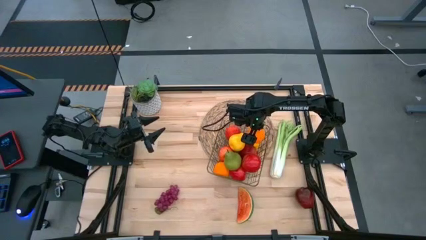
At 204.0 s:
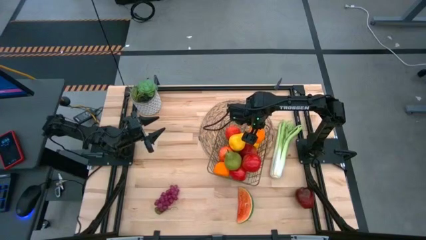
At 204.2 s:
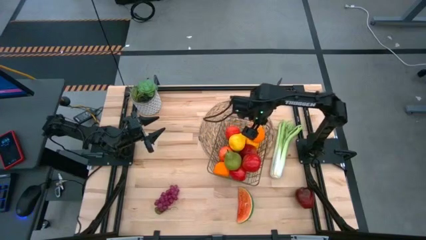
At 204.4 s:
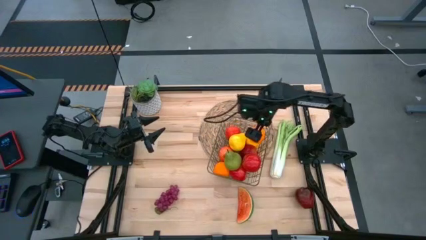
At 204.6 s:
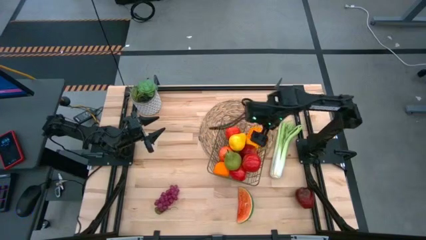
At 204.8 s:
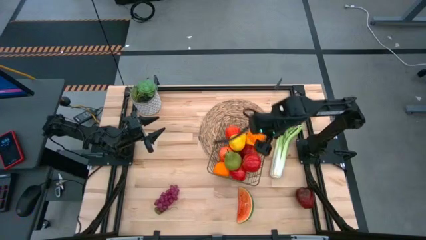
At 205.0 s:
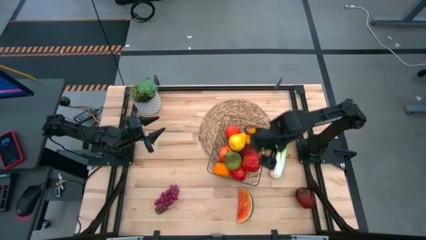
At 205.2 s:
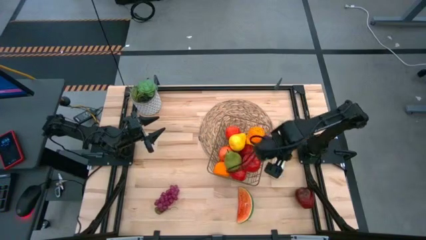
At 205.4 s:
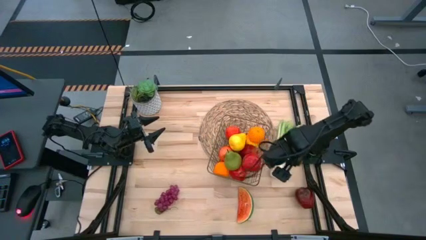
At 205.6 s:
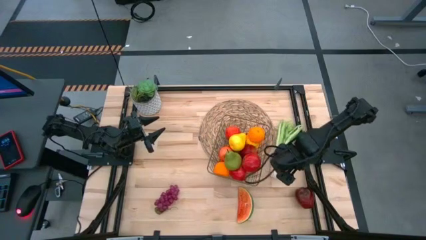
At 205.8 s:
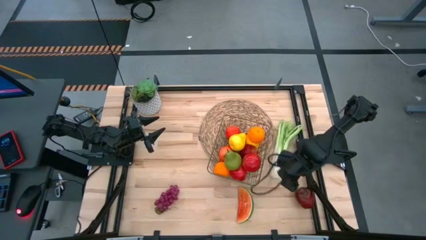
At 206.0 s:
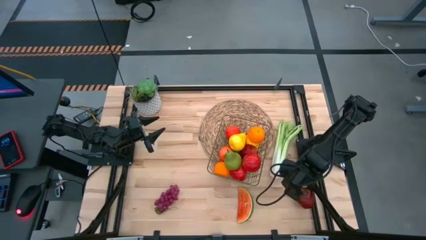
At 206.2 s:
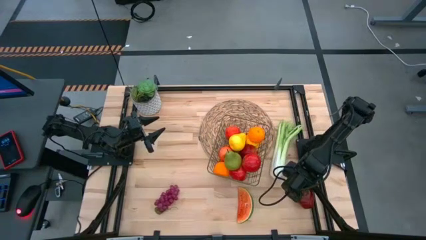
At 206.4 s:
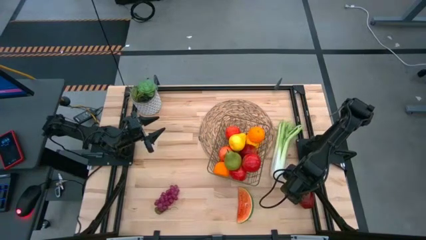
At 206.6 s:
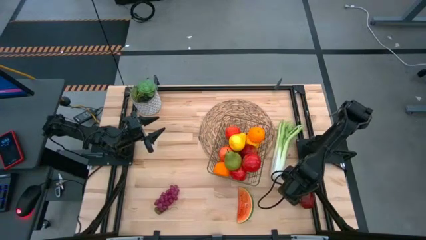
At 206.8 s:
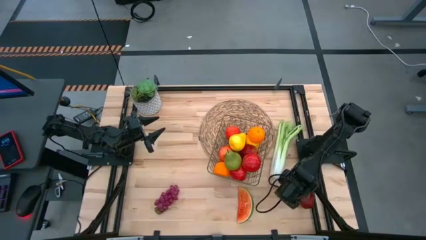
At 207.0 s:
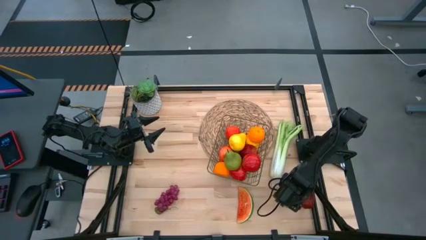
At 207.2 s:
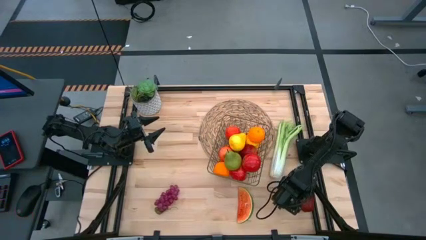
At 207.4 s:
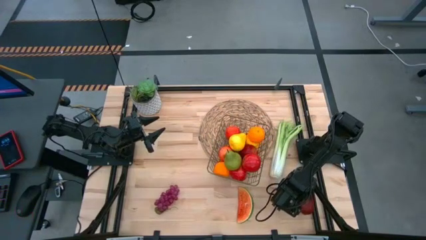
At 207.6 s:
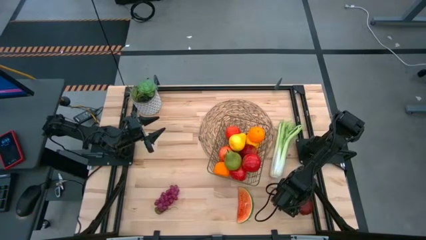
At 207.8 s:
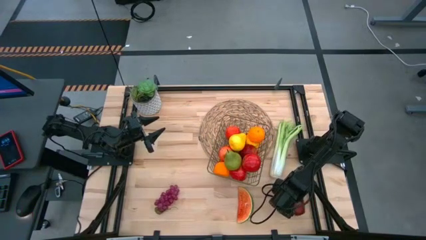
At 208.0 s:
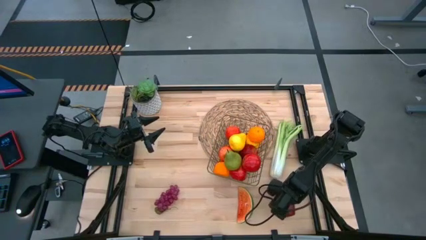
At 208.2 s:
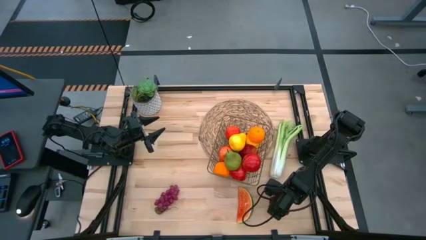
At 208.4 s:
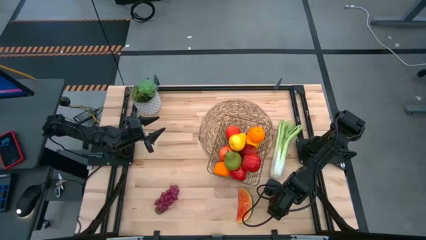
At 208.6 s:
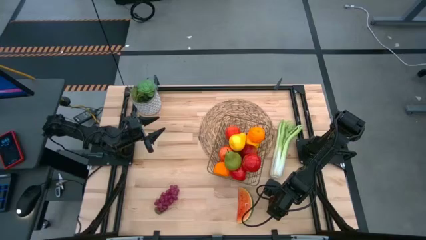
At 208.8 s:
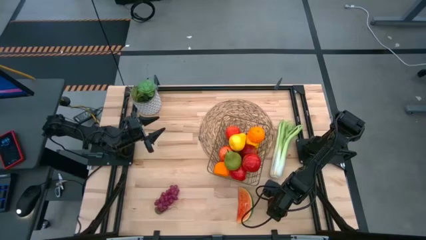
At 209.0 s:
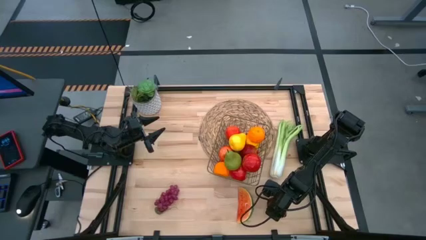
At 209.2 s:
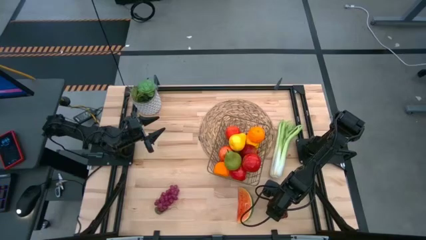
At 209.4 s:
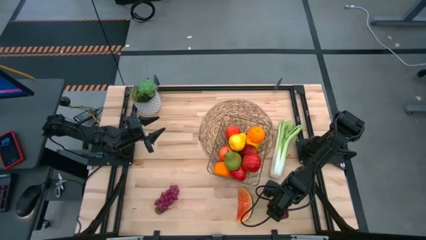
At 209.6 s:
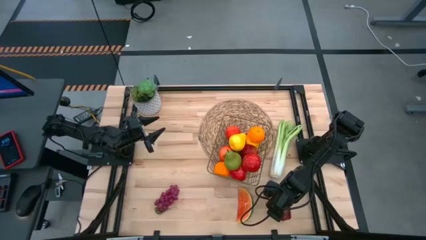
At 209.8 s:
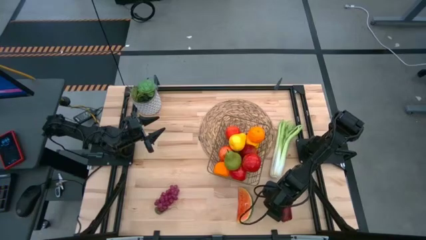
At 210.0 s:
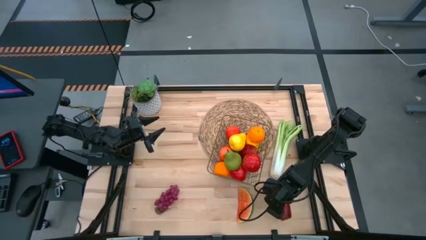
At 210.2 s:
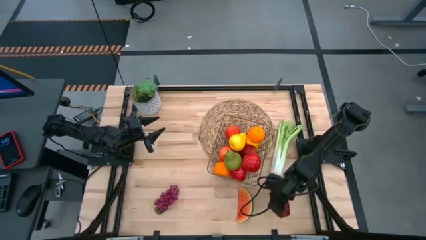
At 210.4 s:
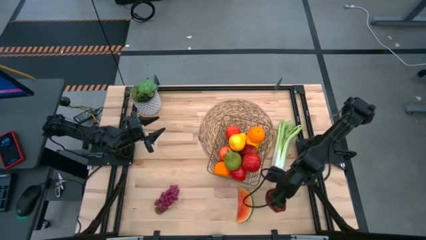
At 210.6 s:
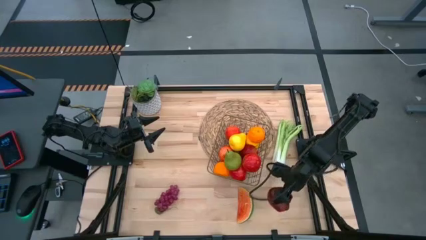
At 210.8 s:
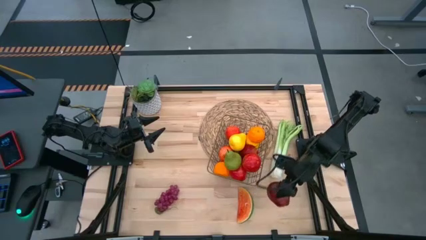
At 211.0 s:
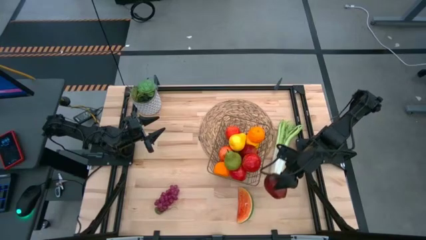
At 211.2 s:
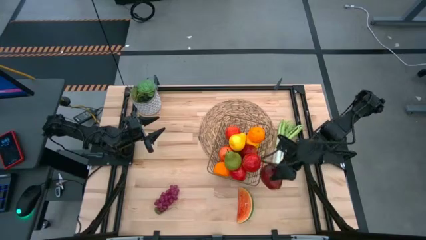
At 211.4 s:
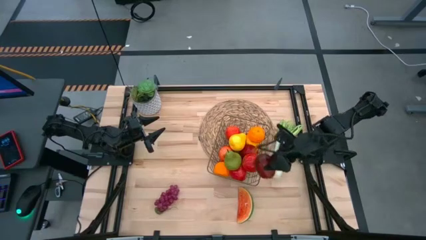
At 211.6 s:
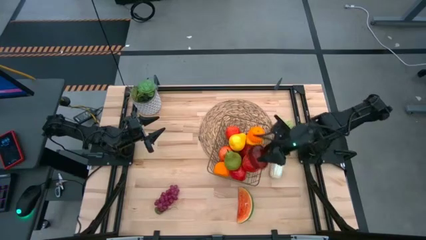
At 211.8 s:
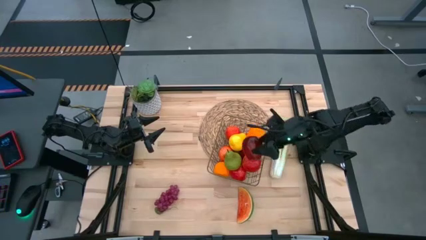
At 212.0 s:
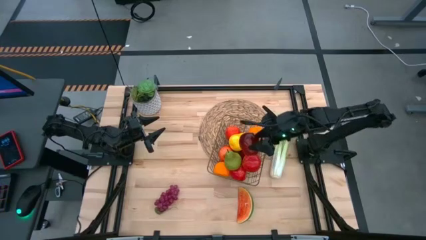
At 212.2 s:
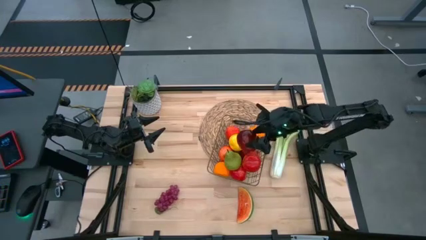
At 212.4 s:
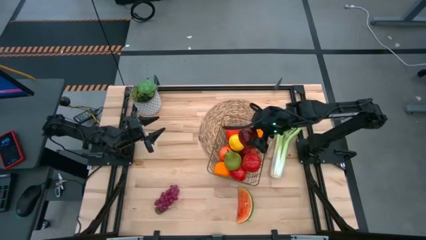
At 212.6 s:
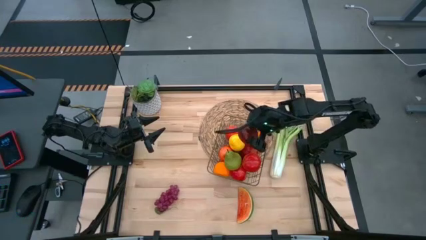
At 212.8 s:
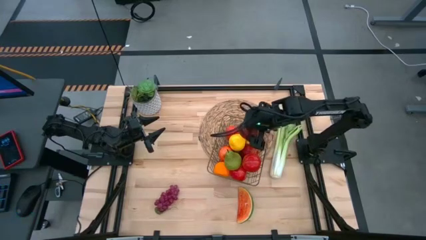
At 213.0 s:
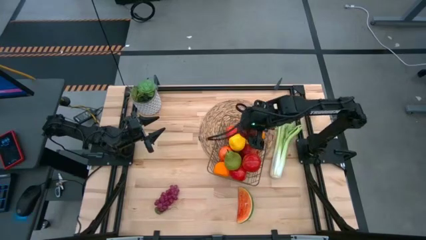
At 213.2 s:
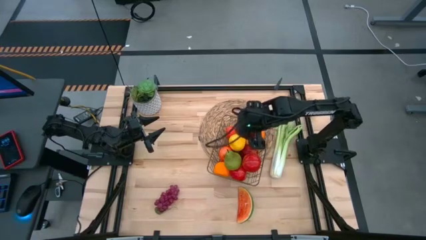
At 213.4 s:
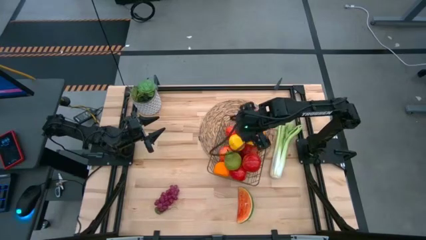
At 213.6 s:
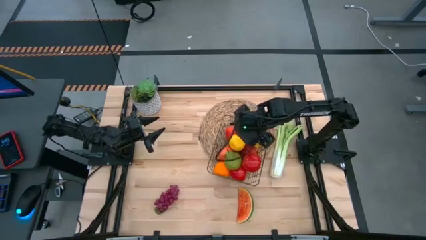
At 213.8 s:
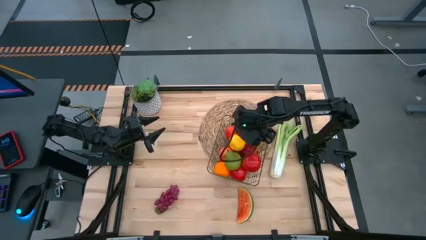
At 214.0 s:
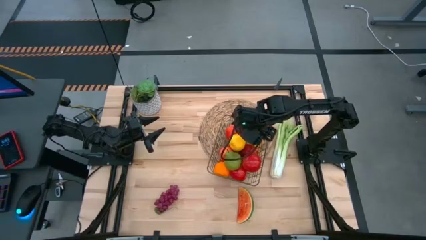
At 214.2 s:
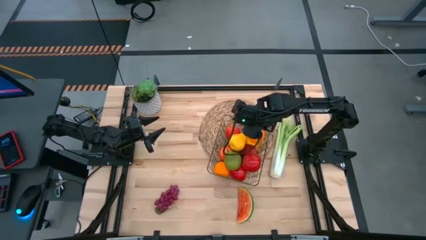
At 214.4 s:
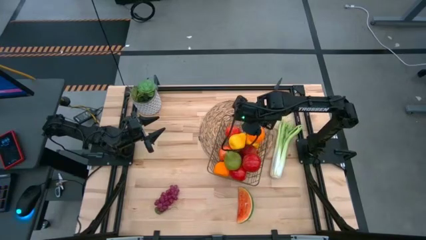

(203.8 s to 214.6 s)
Task: Build produce basket
Put the dark red apple into the wire basket
